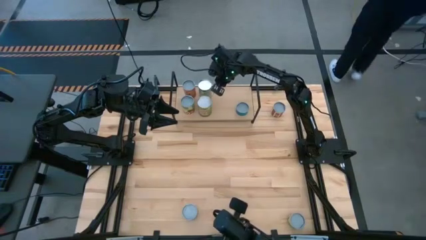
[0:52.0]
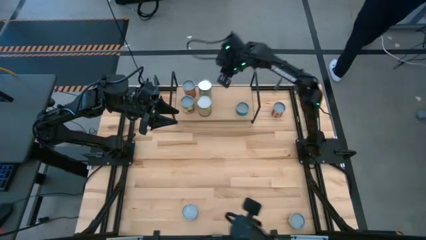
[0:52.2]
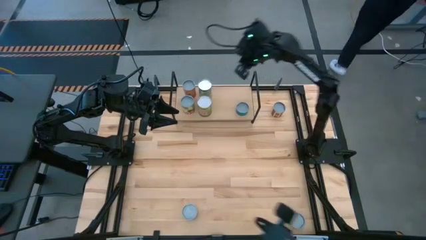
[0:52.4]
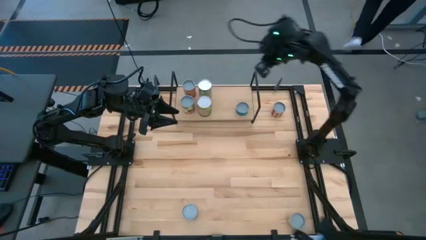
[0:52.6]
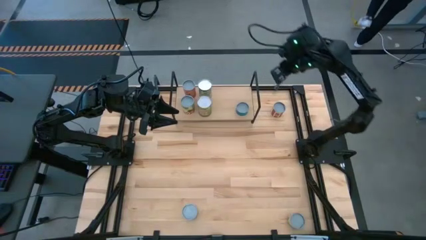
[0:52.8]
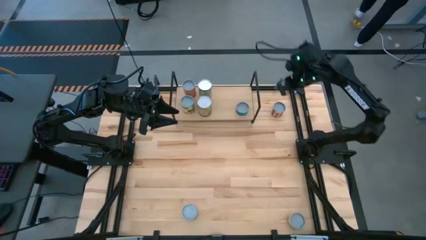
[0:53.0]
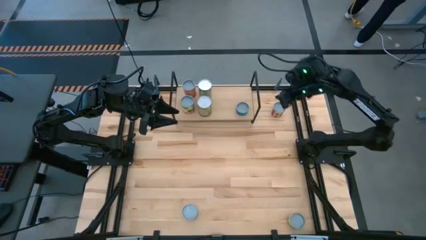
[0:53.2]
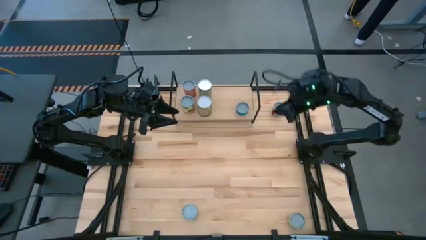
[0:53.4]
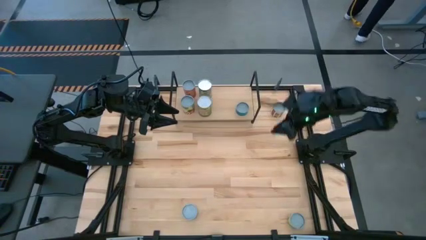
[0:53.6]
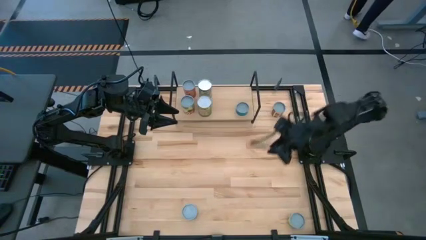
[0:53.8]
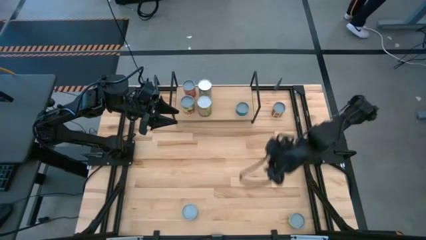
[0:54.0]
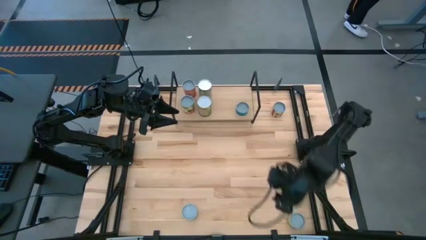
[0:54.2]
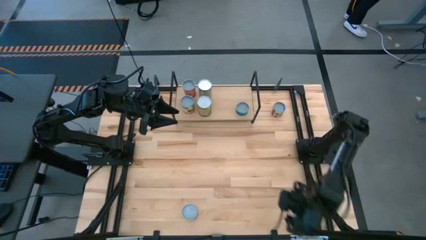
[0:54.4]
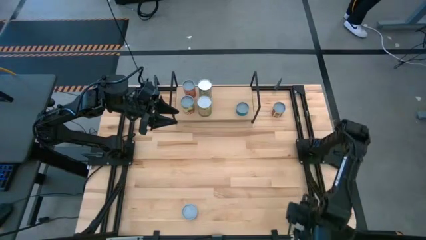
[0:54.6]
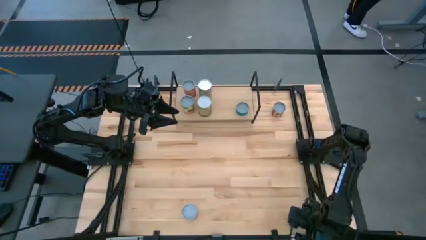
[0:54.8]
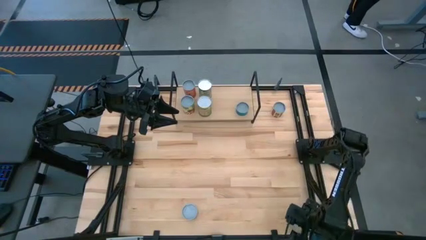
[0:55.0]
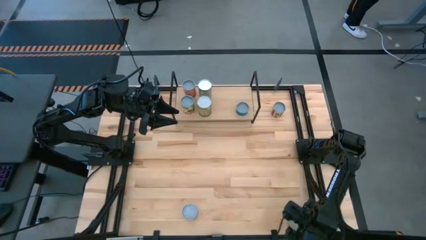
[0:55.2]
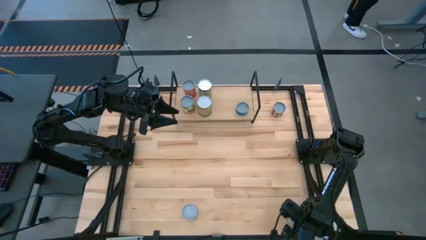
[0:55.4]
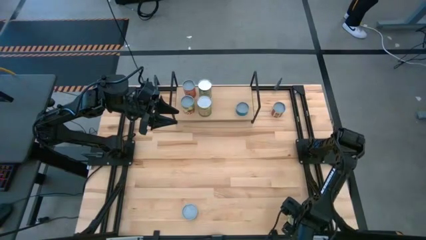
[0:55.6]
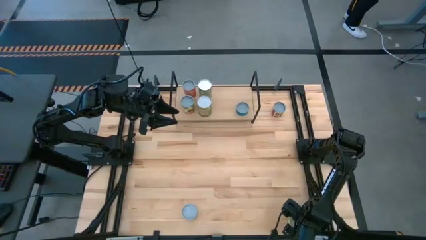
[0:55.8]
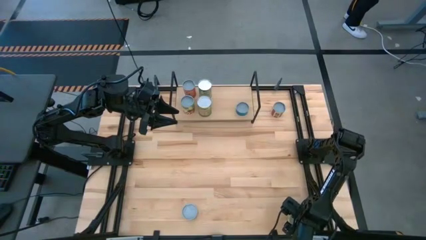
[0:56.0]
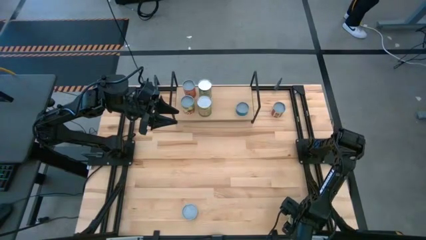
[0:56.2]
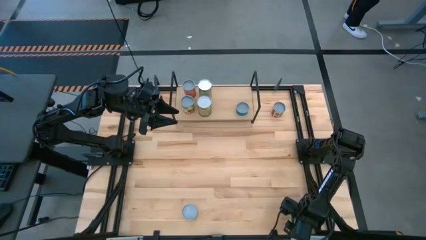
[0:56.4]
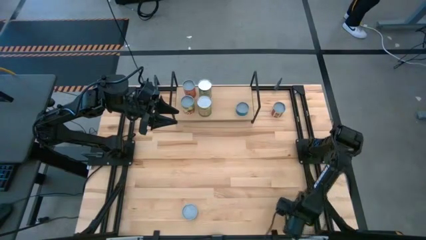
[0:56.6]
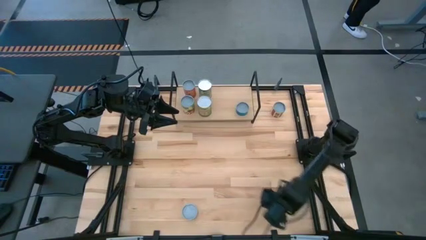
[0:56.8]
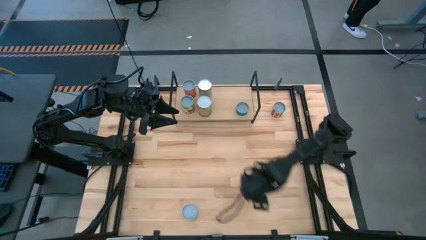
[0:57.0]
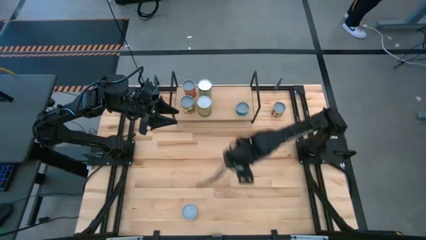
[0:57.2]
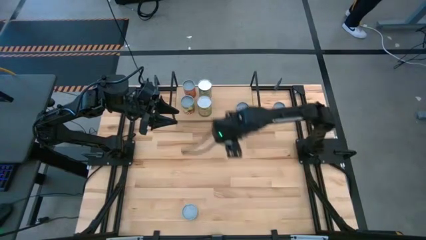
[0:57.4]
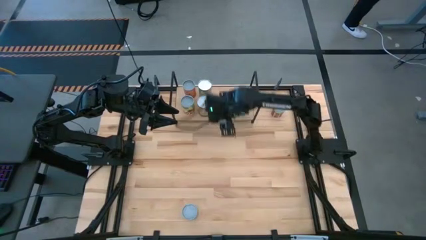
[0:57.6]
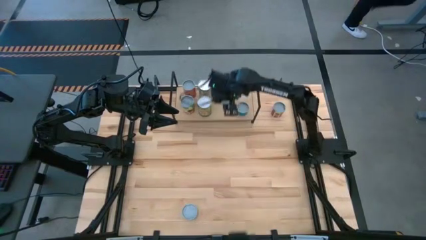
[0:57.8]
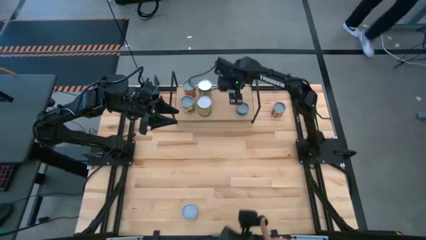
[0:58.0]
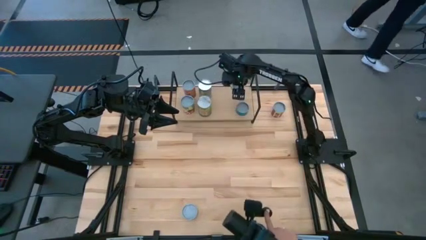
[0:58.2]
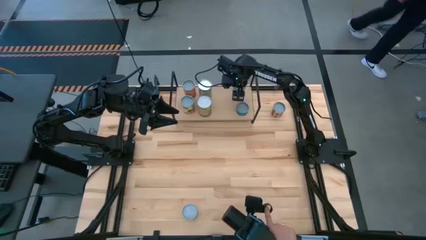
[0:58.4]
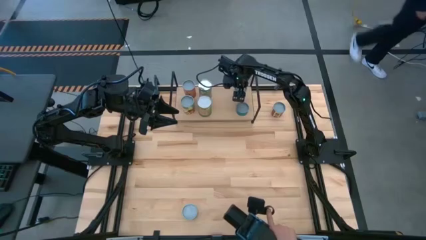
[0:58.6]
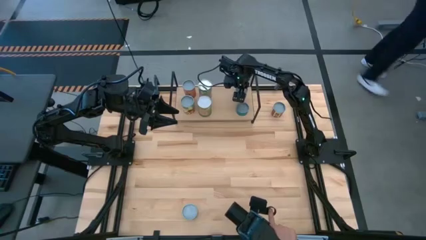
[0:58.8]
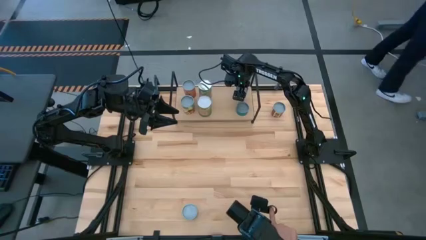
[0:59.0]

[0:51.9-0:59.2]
Task: Pick and place cans onto a shelf
Put the canned mushrooms on the shelf

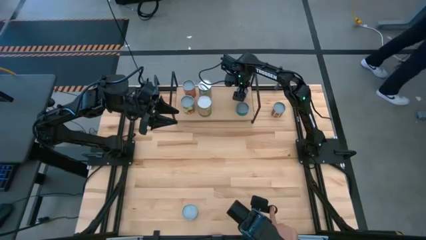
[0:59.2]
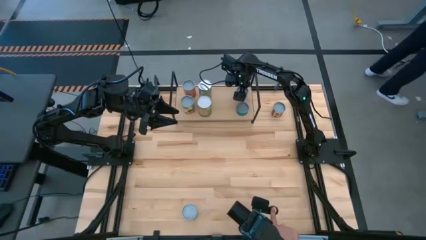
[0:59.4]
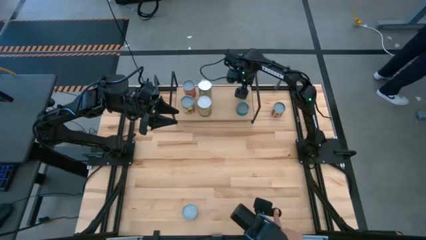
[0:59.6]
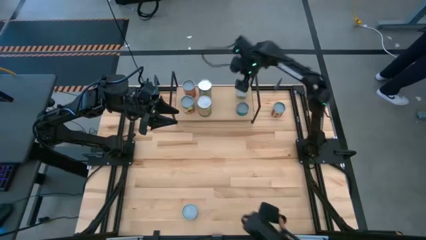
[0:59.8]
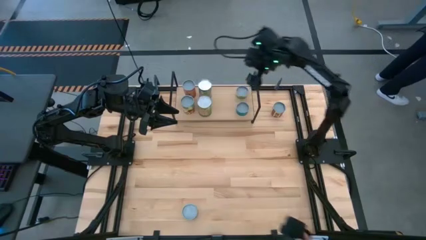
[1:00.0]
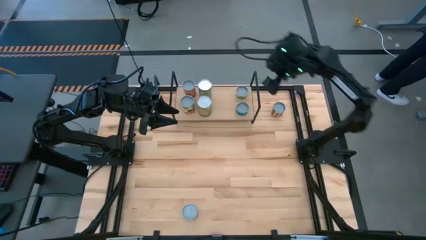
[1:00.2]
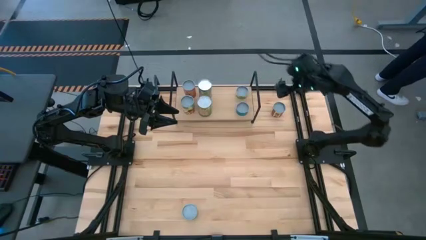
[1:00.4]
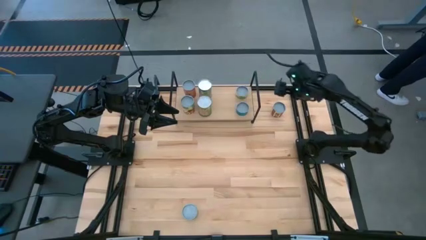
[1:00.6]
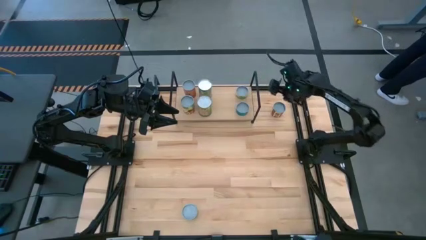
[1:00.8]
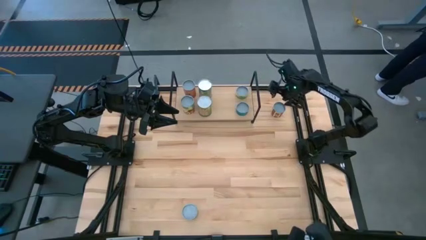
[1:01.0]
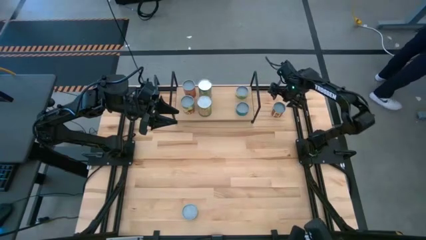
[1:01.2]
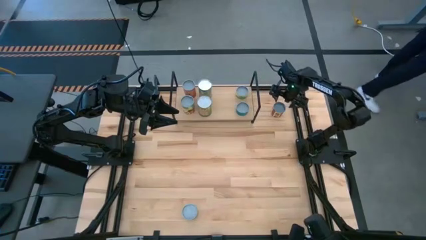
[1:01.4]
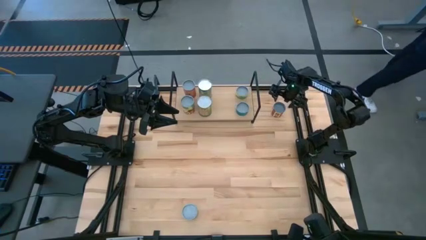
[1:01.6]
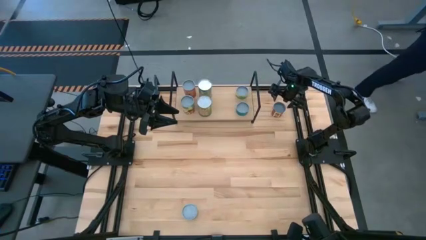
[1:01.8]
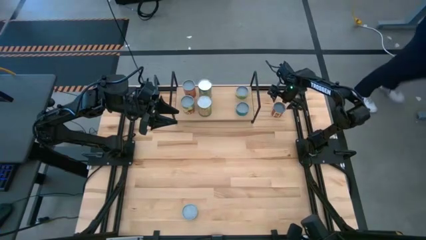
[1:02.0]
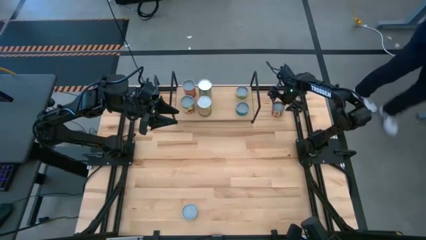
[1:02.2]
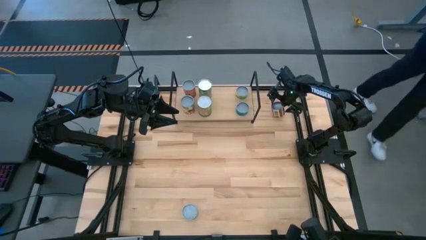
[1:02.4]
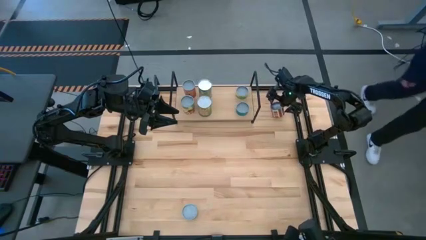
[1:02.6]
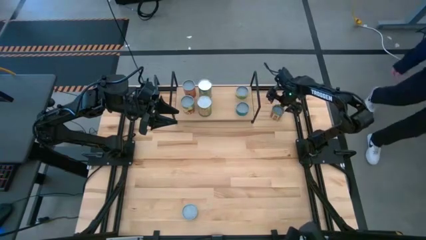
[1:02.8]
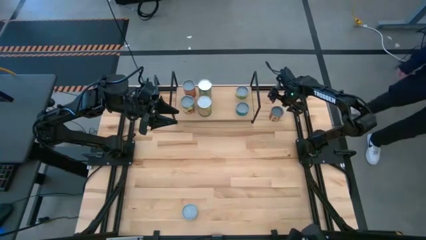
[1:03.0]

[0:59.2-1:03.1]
Put the canned diced tomatoes on the shelf

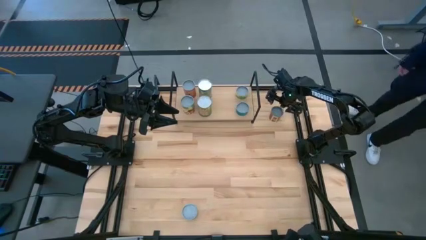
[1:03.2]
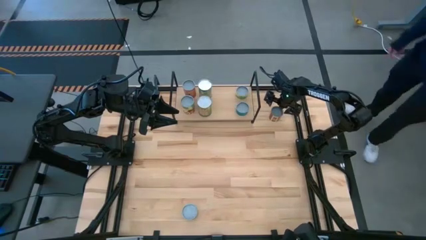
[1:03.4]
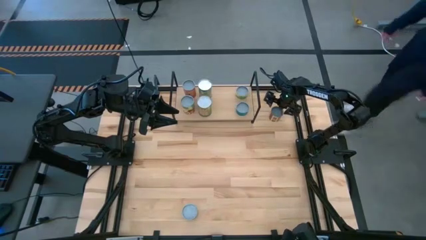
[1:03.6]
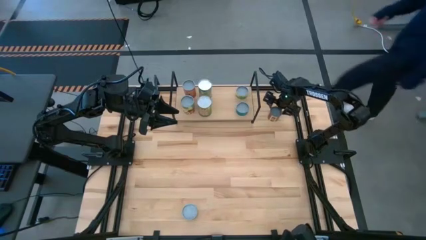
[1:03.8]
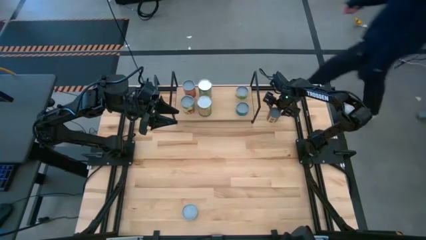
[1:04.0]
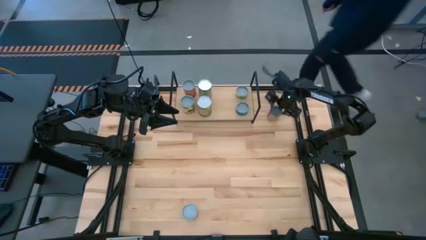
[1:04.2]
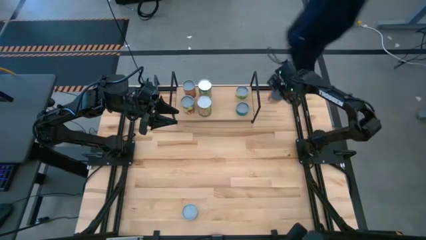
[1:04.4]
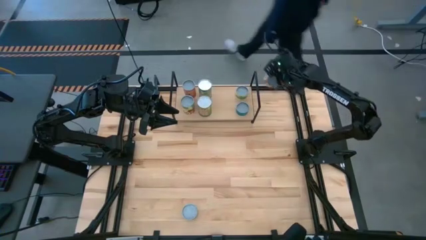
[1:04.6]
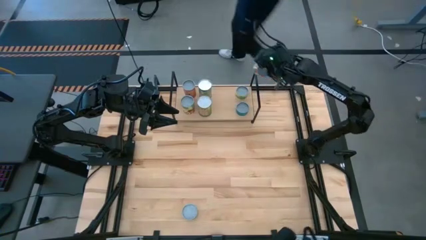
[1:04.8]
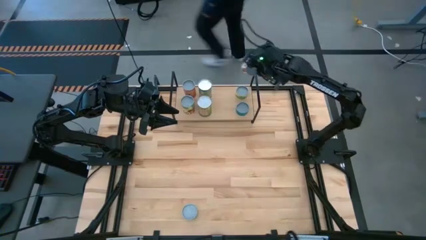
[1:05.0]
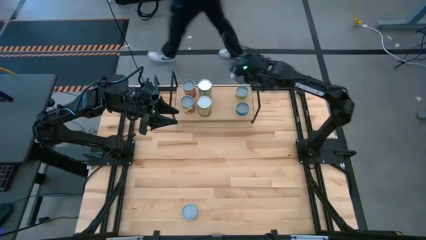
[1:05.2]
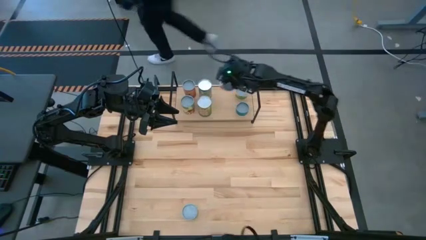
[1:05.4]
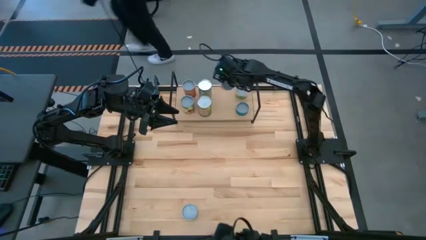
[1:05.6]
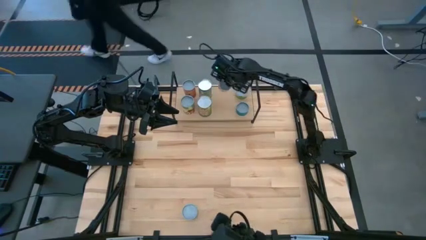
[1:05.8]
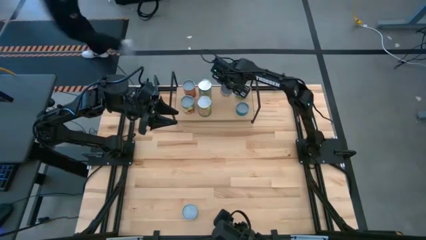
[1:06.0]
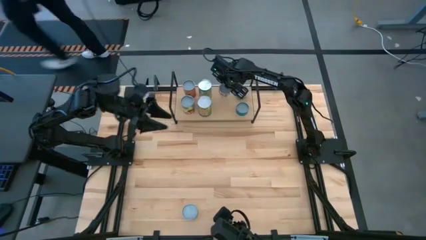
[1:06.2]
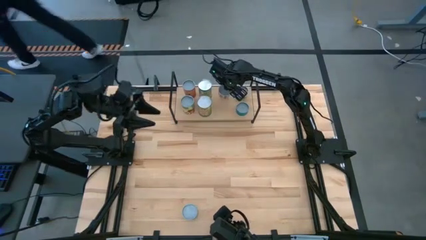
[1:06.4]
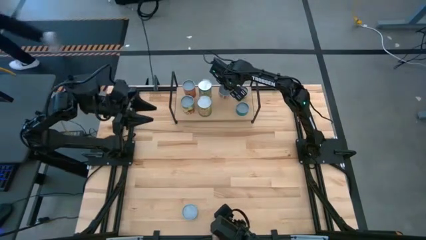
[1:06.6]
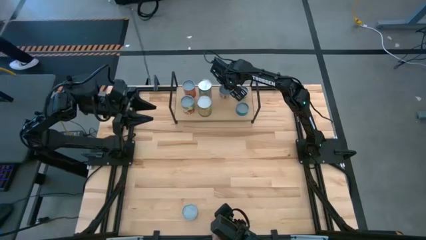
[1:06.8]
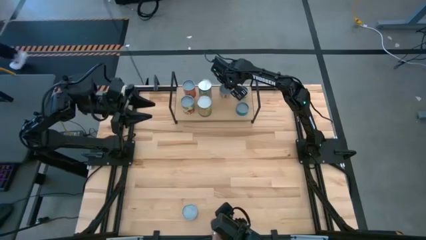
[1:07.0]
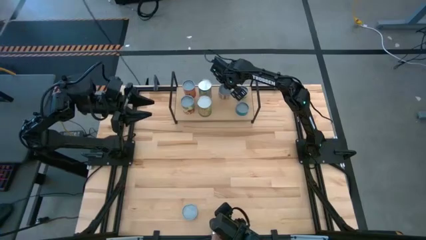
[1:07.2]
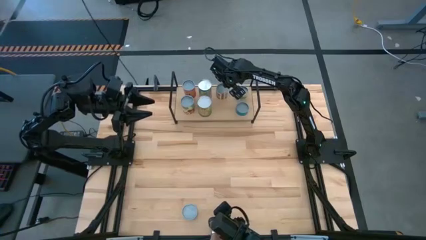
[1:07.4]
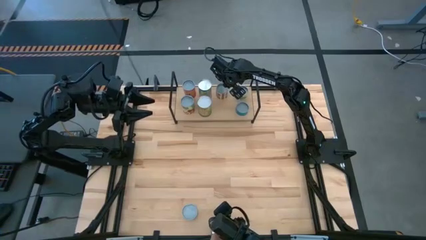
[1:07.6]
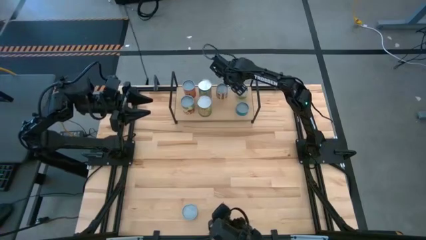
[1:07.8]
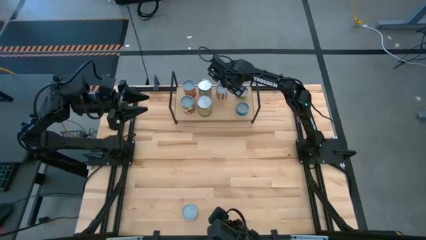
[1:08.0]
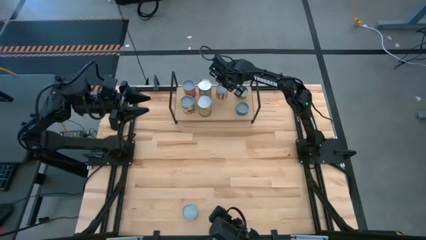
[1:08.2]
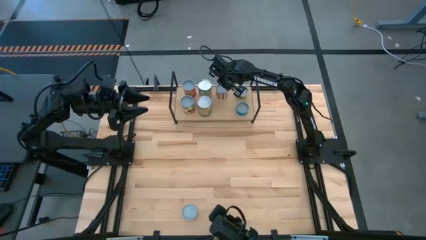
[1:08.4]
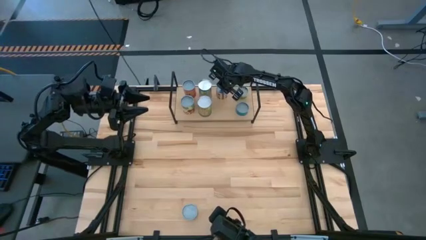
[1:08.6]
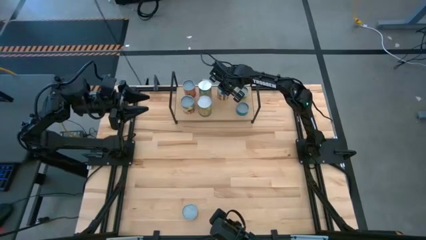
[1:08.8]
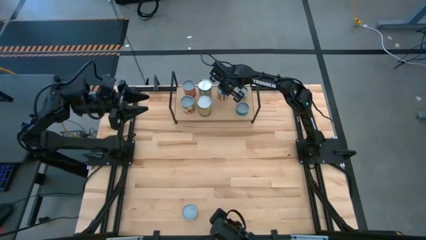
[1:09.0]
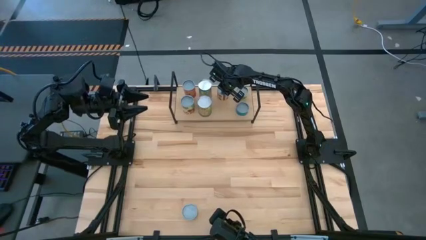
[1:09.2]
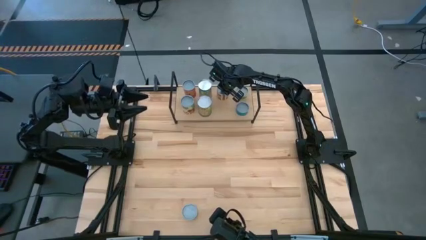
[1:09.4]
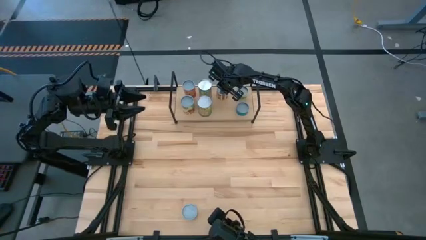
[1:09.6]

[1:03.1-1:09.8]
Put the canned diced tomatoes on the shelf
